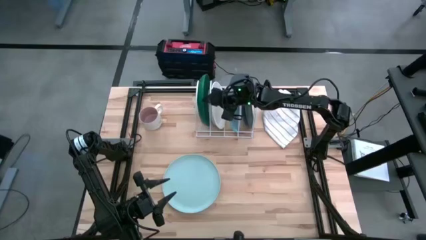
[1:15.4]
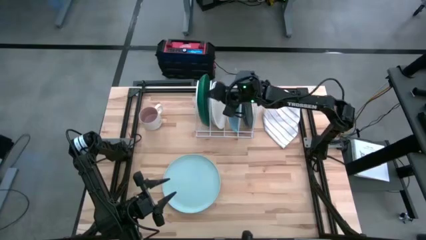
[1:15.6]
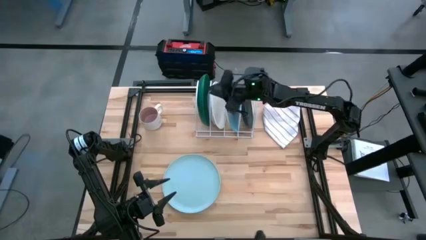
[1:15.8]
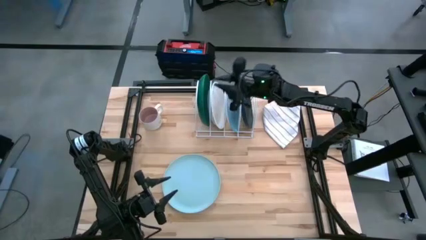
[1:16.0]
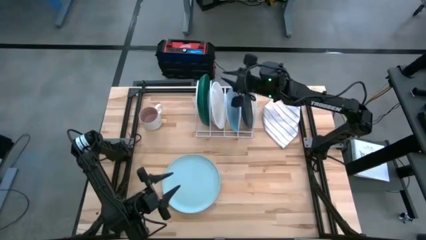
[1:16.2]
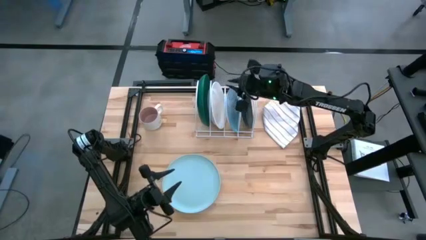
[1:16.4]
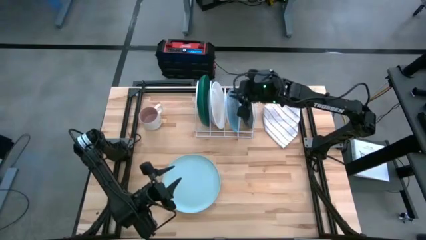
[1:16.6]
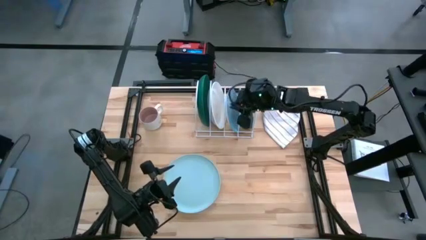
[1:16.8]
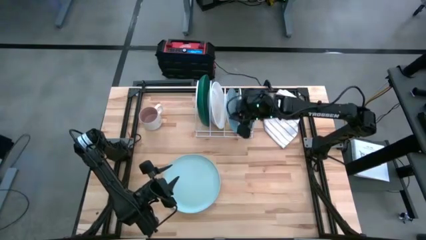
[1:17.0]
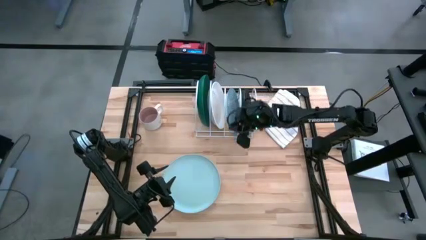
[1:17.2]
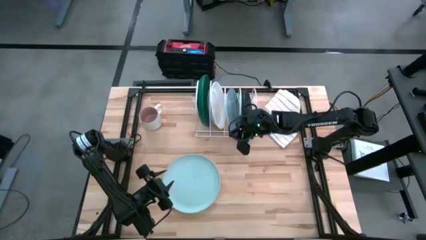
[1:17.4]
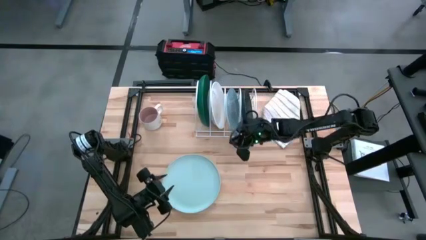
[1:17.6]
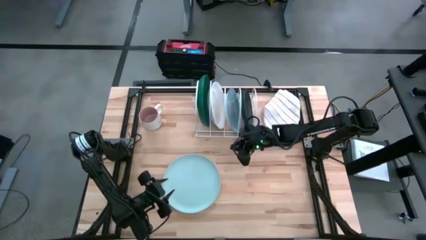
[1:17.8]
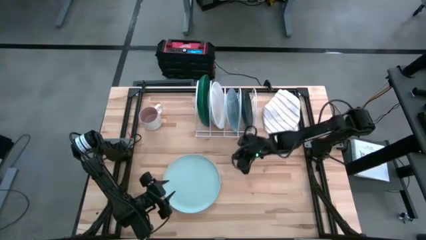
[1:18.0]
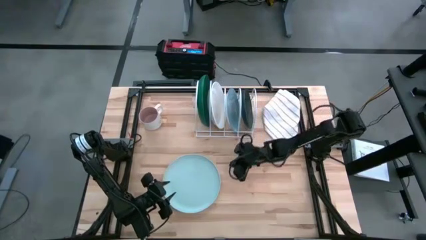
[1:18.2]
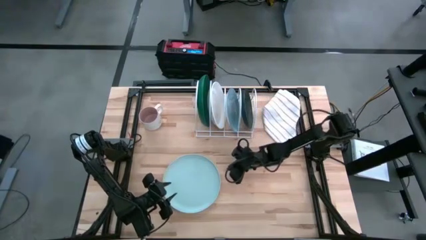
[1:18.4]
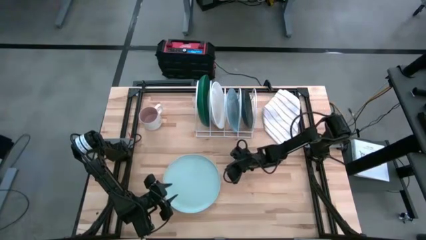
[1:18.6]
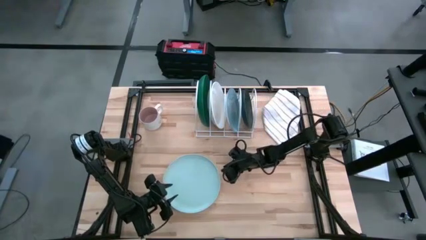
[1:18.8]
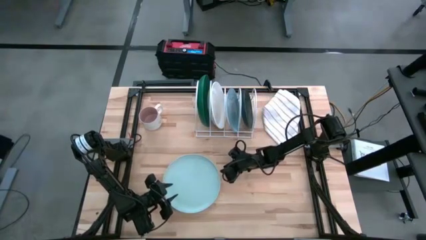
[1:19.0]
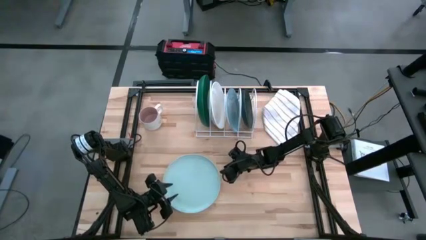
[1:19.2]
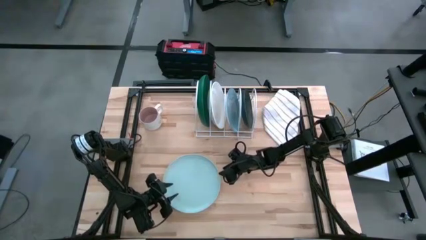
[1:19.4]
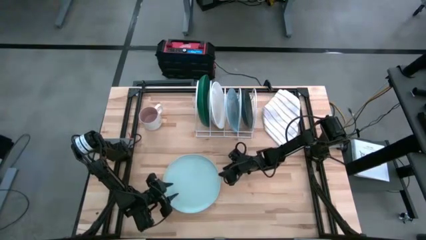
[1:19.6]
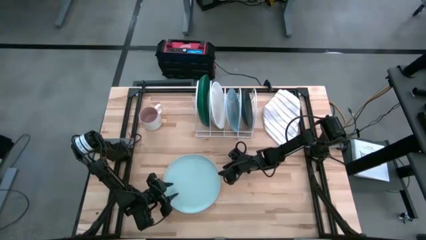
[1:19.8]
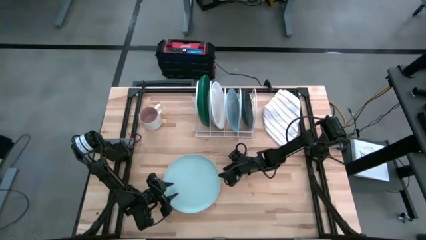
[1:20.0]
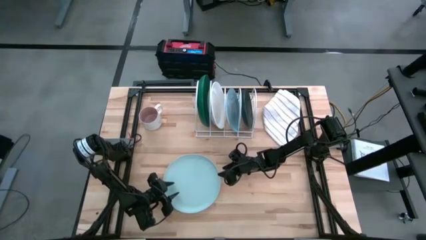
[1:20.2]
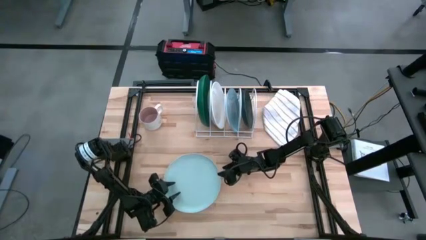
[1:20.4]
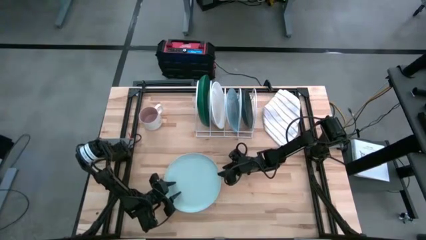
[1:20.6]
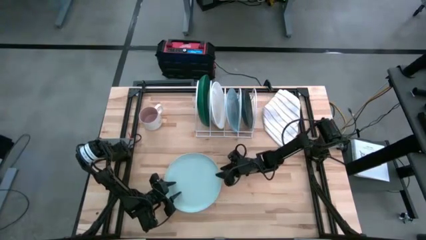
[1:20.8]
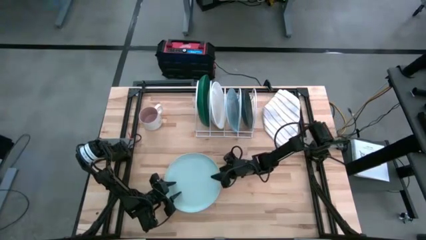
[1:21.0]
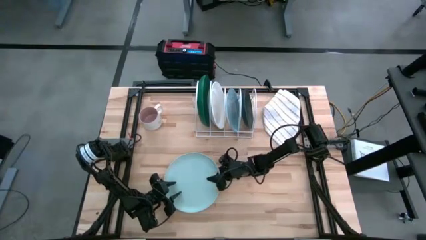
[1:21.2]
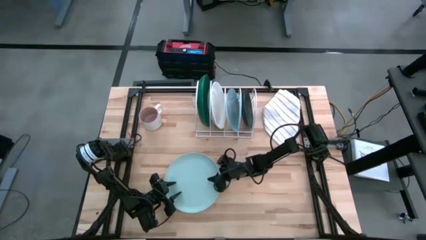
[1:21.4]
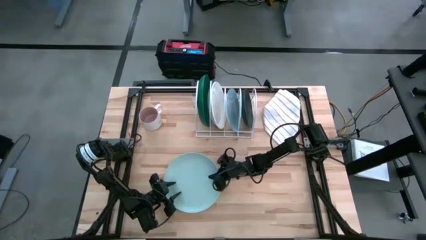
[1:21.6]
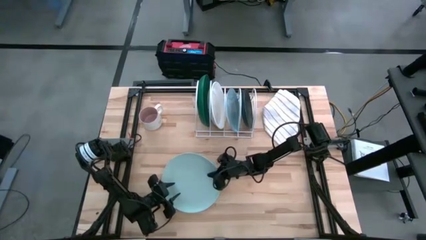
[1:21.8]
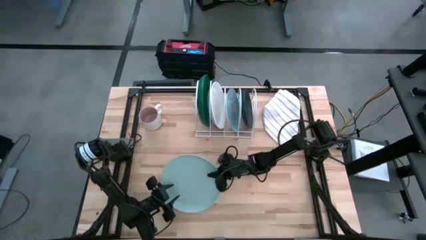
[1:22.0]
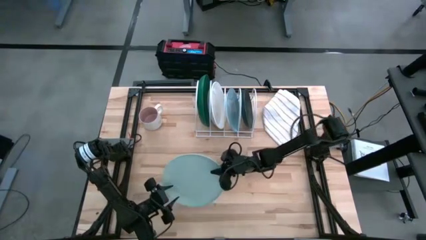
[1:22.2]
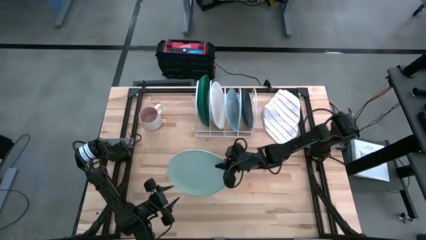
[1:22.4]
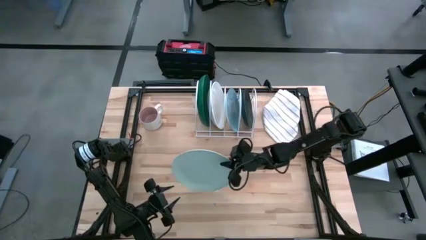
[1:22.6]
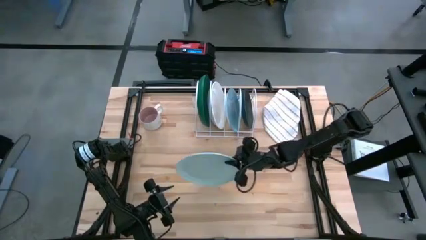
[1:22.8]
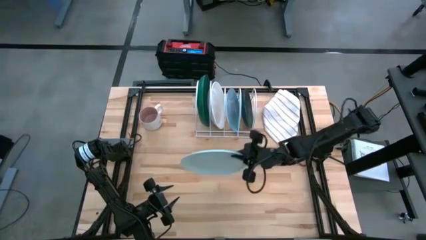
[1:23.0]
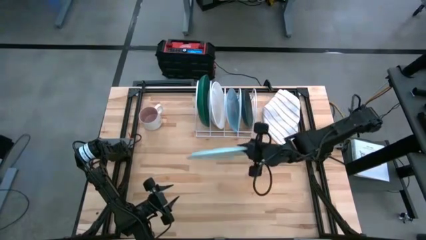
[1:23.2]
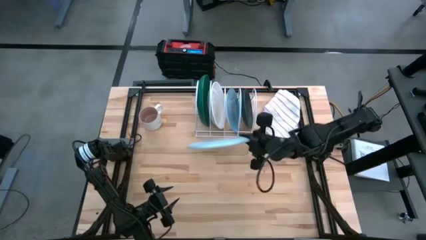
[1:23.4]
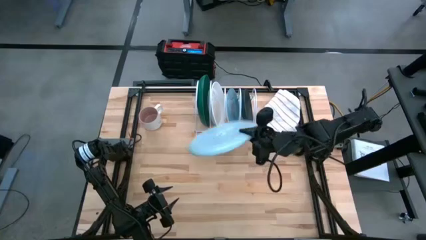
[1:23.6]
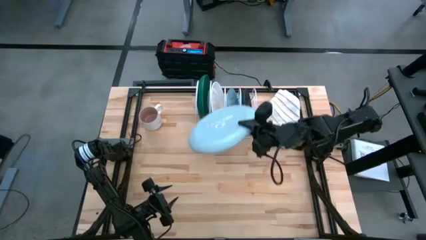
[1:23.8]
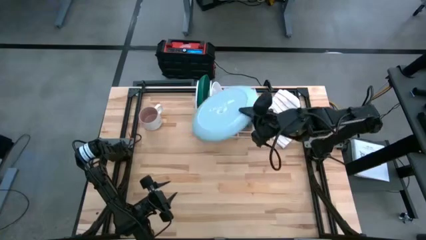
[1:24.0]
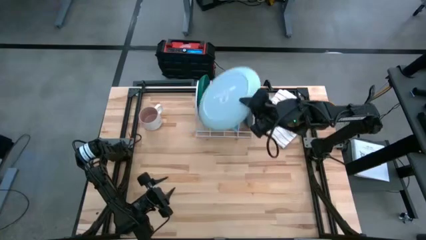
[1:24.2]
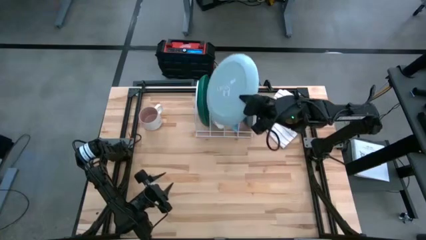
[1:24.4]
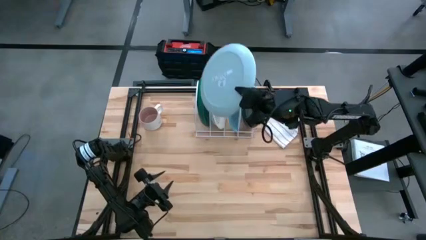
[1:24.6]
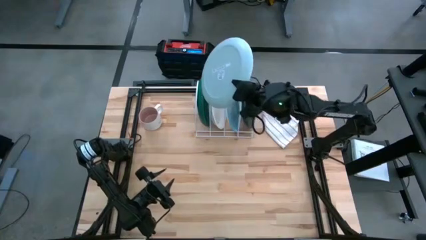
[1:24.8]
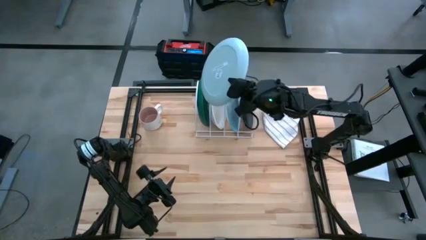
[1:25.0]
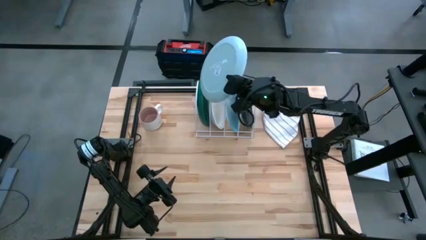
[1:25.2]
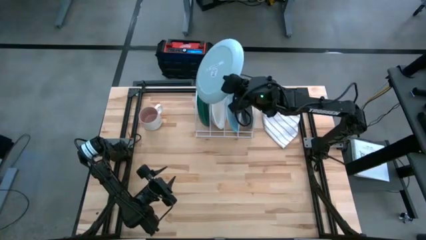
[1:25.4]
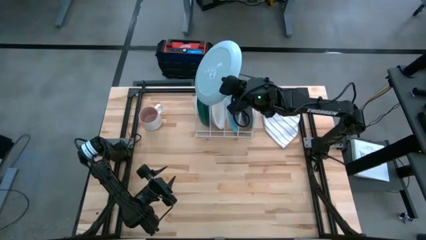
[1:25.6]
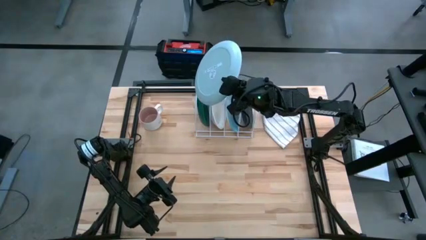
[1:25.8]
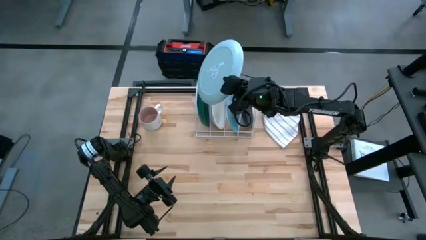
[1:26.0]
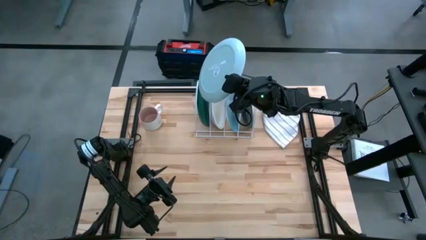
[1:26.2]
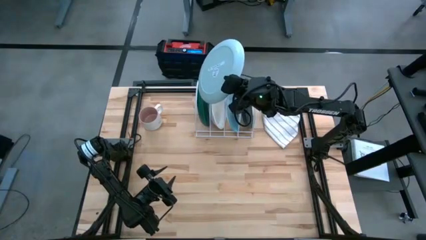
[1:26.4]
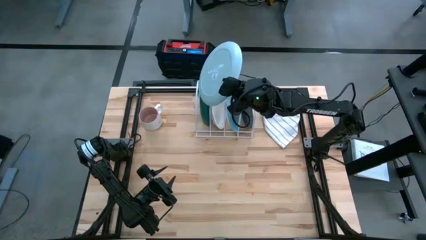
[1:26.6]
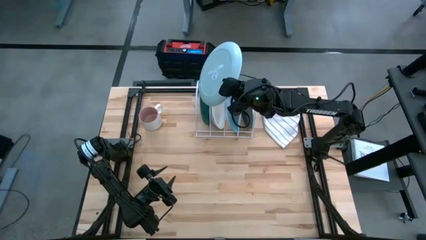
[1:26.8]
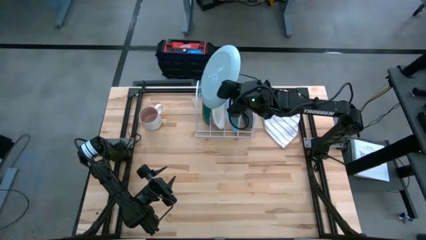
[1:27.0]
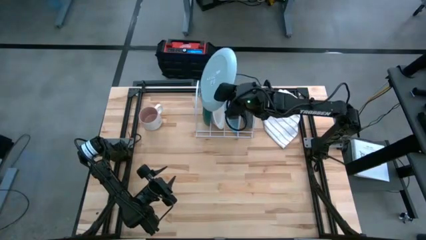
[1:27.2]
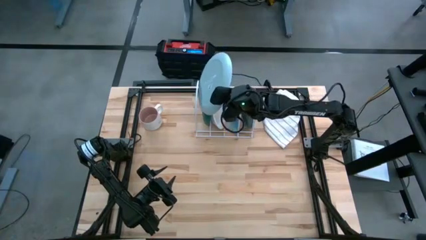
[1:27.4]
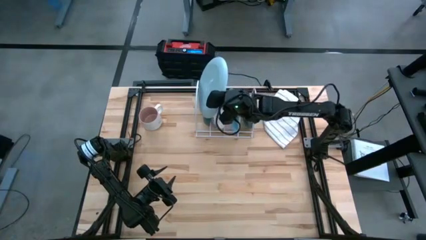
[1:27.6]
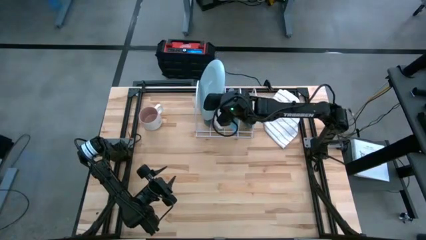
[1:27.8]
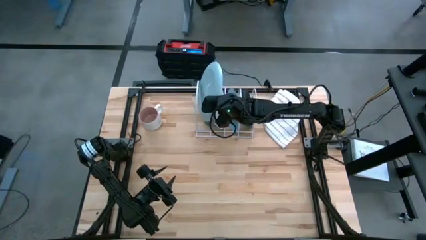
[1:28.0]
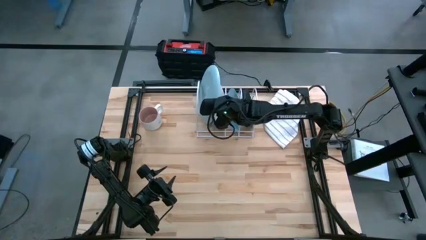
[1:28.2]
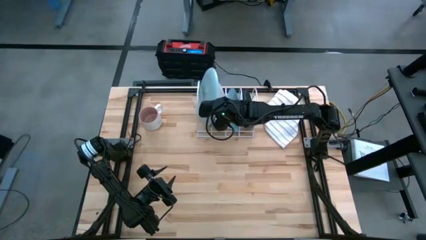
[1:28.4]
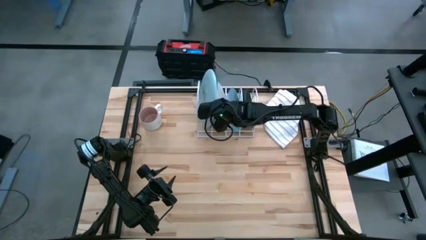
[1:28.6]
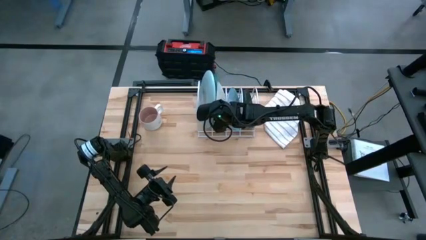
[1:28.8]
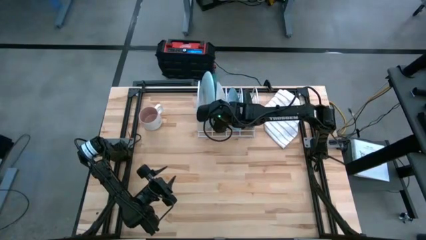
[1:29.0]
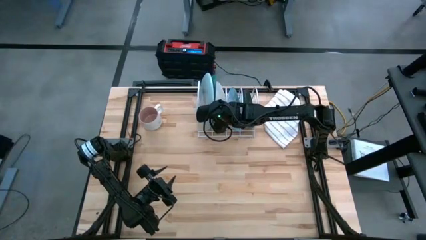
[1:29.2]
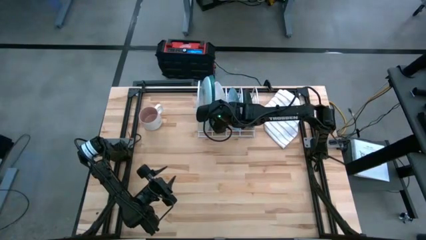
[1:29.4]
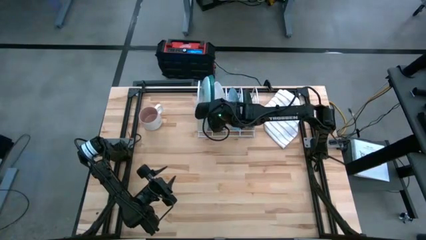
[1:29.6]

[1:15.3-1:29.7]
Task: Sort dishes
Put the gray plate in the dishwasher rack

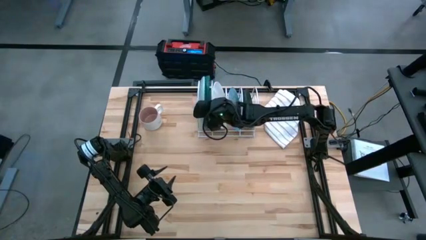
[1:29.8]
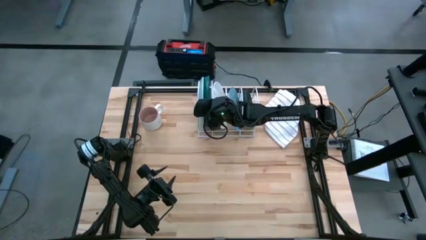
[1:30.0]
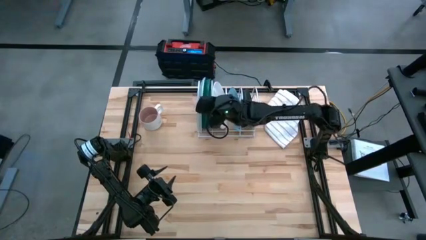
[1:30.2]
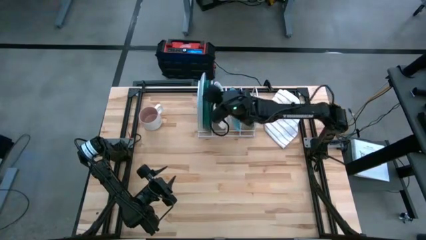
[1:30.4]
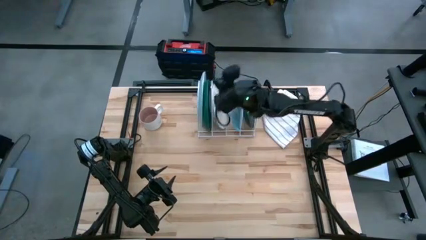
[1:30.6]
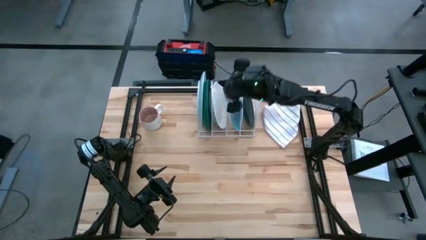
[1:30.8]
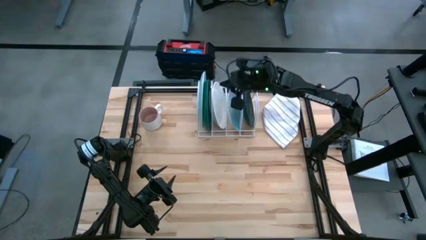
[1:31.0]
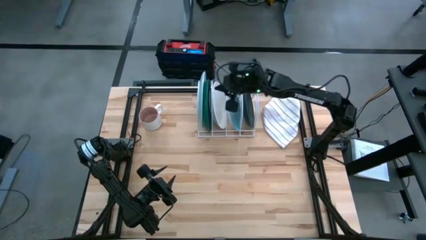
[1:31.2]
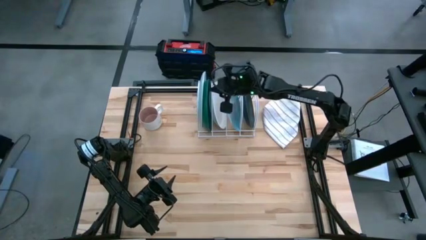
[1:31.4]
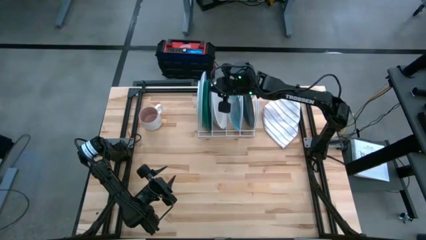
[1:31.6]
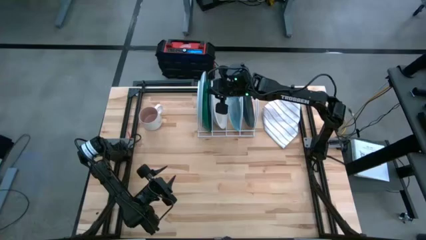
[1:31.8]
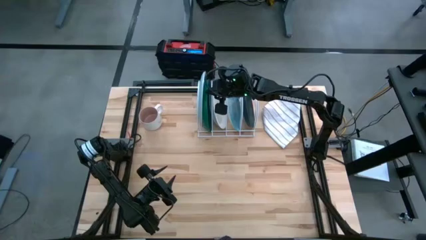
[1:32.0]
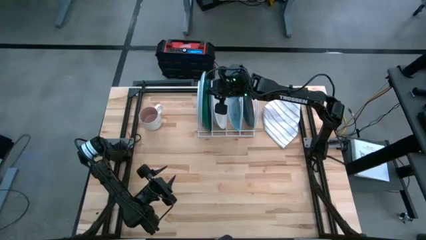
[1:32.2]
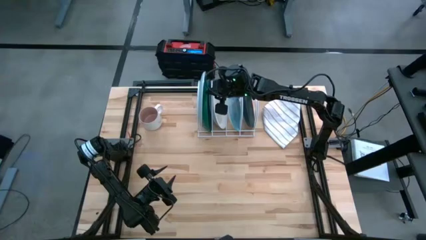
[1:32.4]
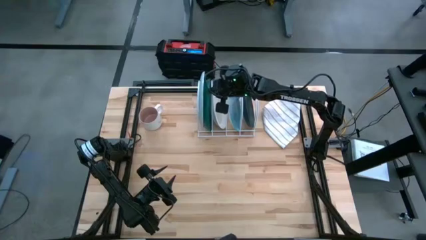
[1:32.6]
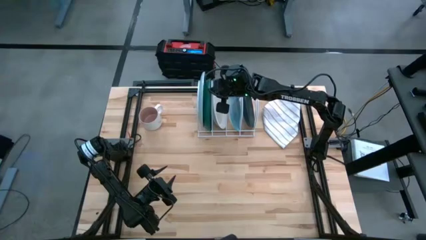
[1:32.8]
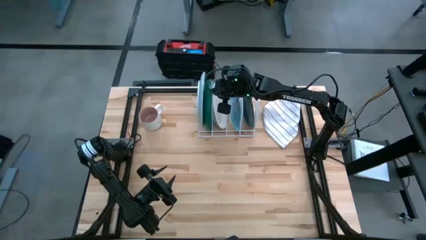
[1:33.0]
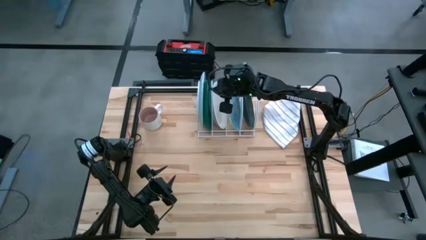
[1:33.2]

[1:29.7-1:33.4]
Adjust the green plate in the dishwasher rack
